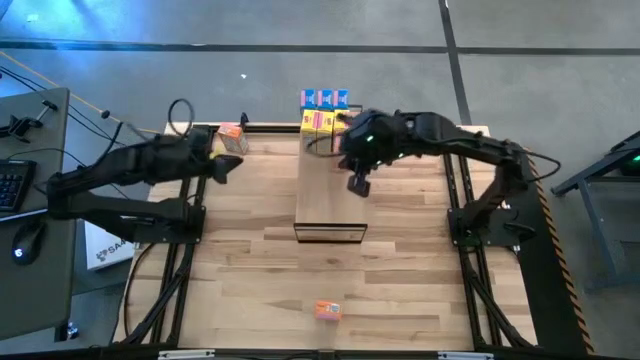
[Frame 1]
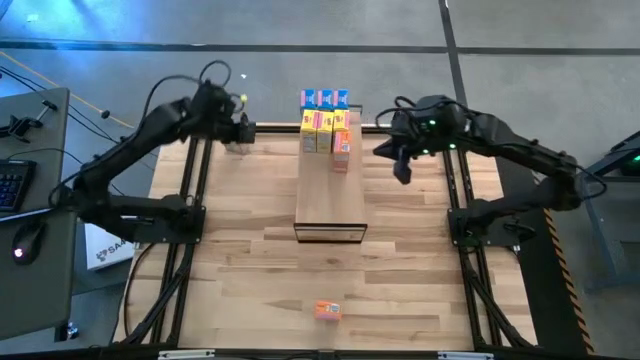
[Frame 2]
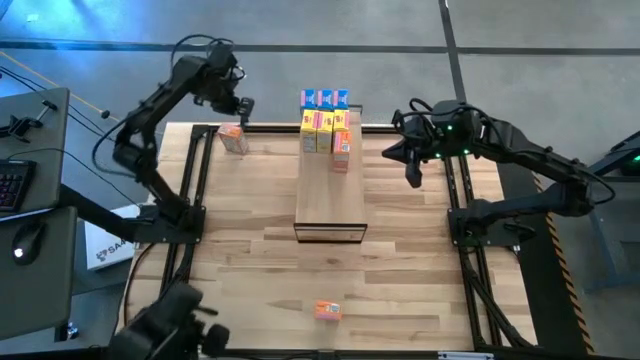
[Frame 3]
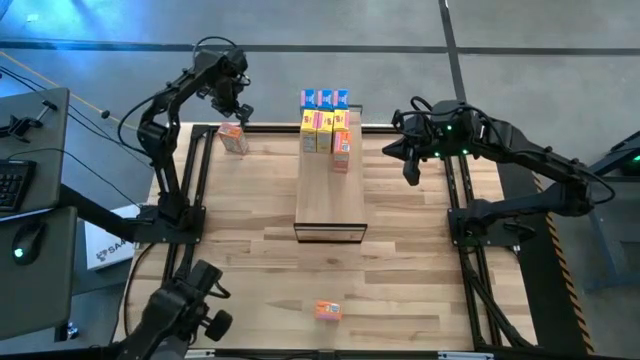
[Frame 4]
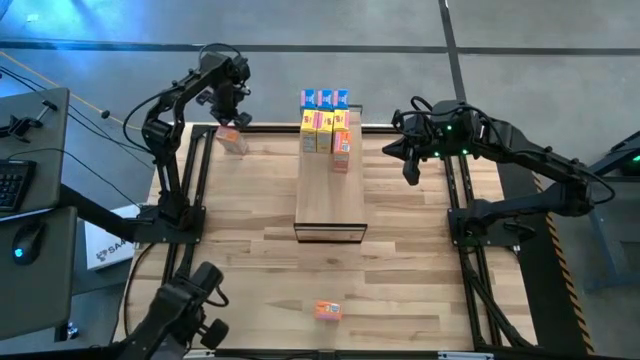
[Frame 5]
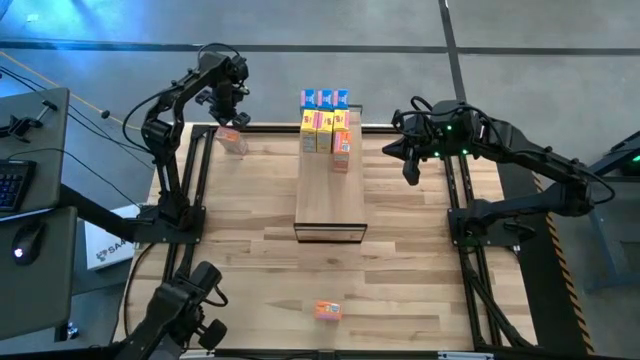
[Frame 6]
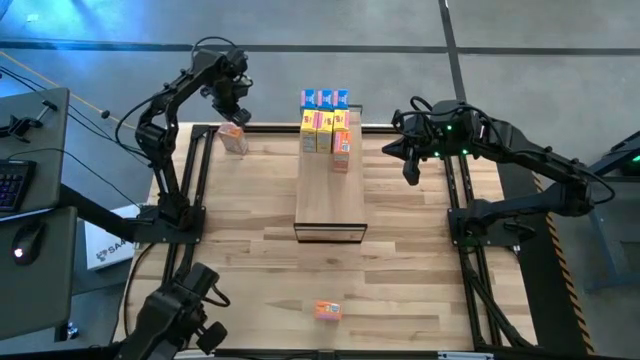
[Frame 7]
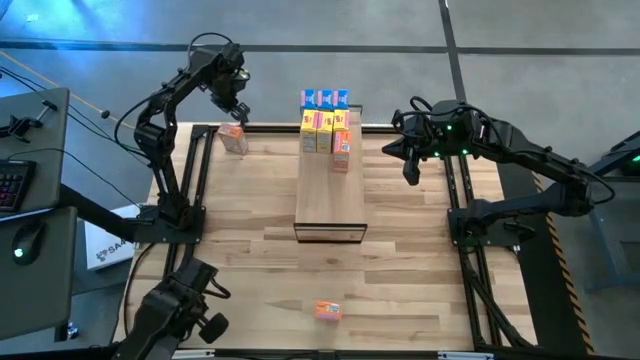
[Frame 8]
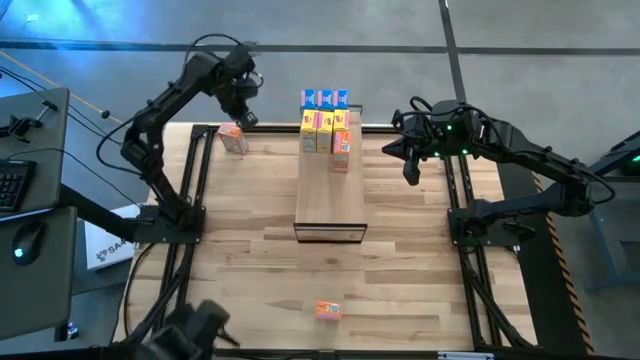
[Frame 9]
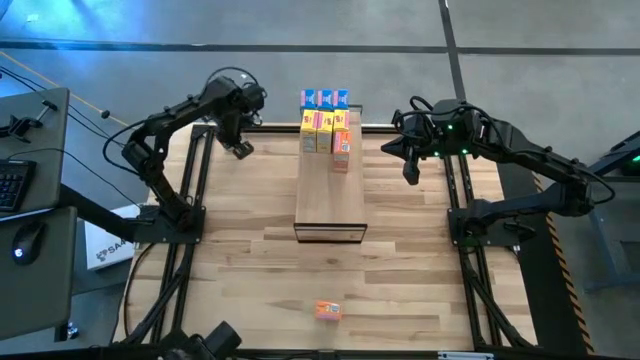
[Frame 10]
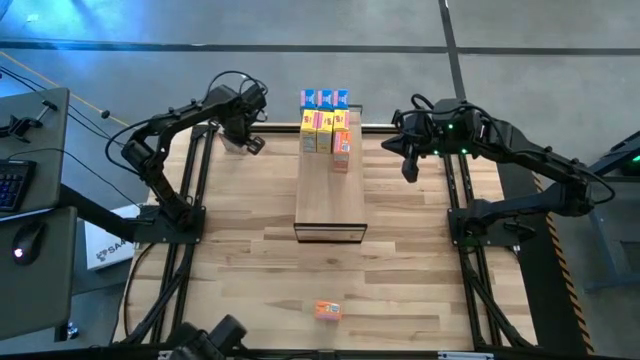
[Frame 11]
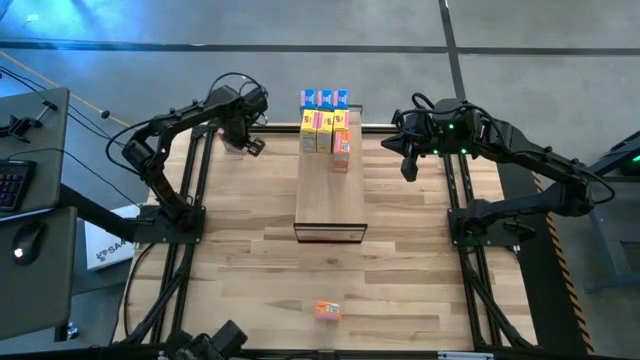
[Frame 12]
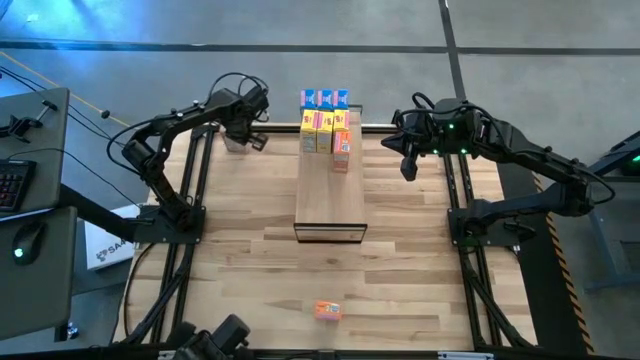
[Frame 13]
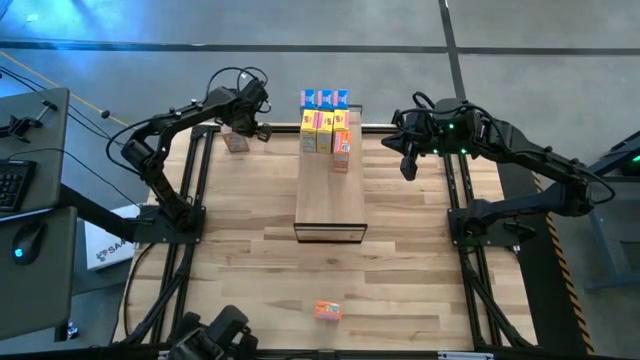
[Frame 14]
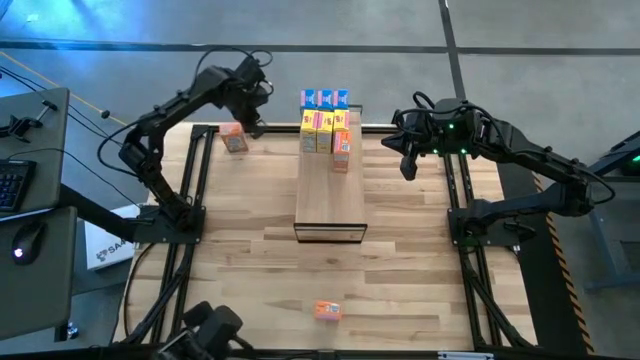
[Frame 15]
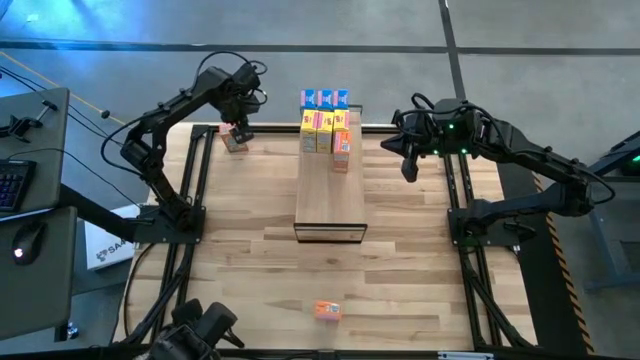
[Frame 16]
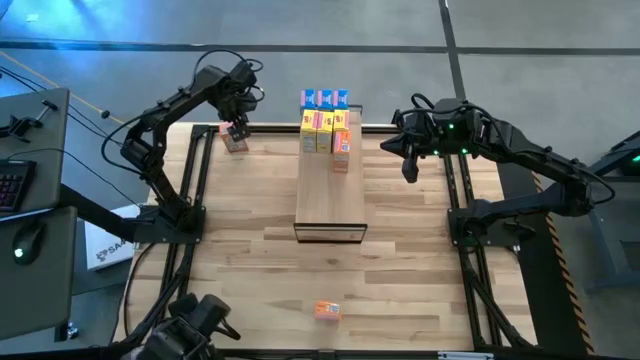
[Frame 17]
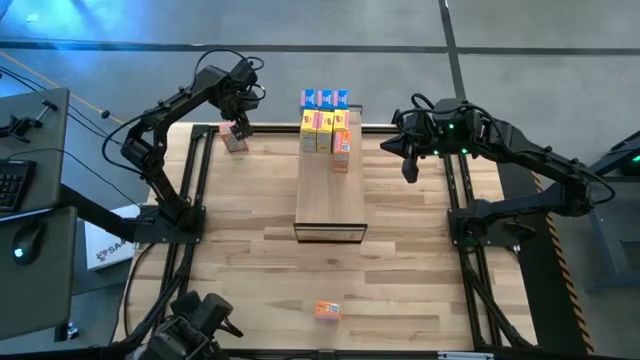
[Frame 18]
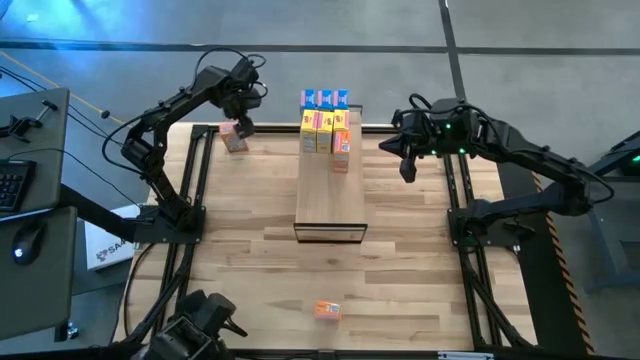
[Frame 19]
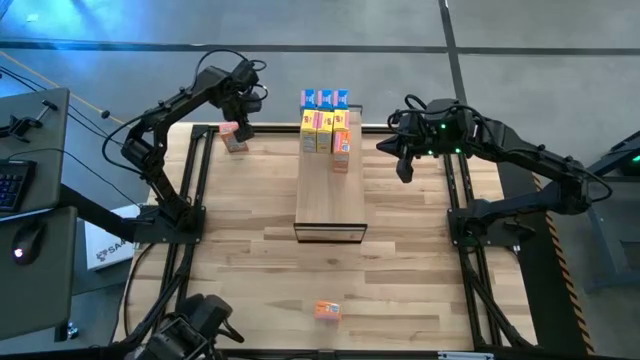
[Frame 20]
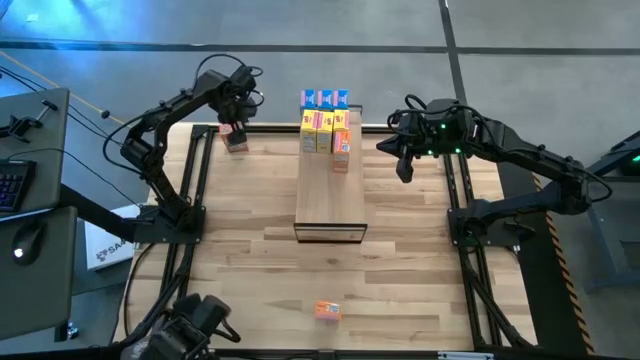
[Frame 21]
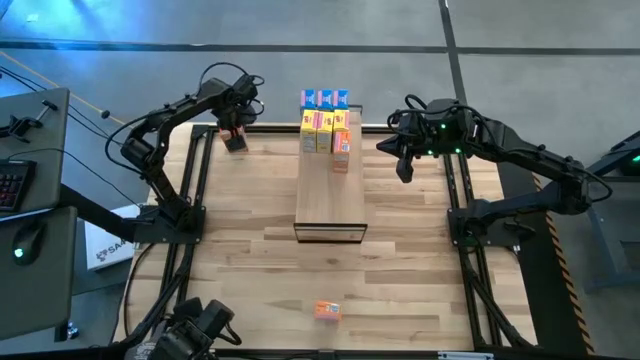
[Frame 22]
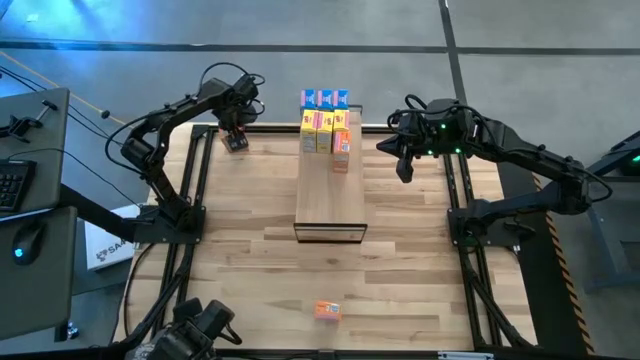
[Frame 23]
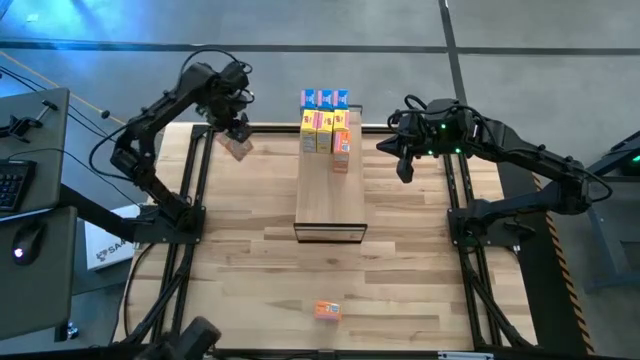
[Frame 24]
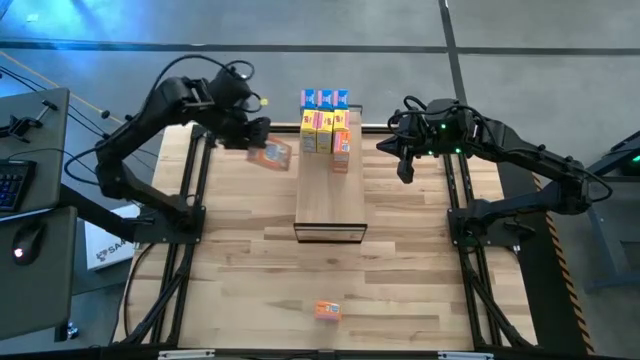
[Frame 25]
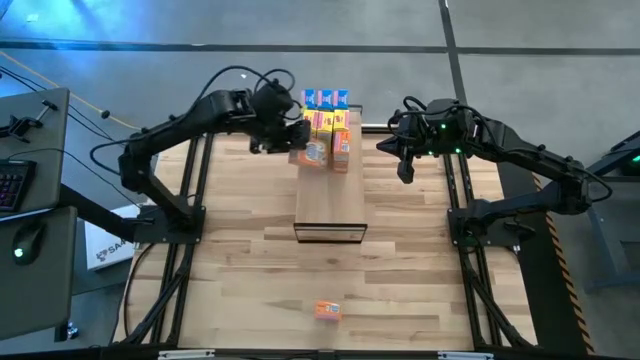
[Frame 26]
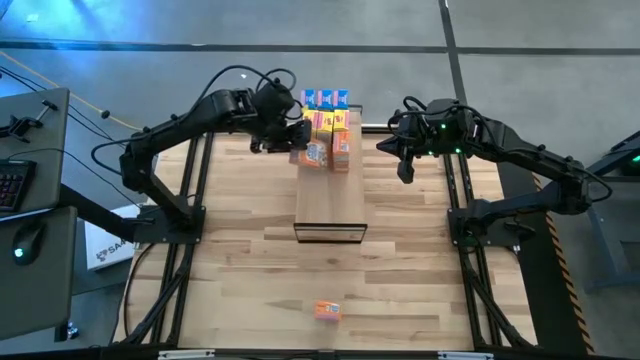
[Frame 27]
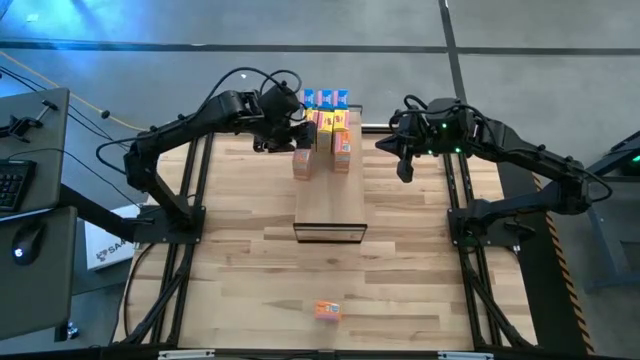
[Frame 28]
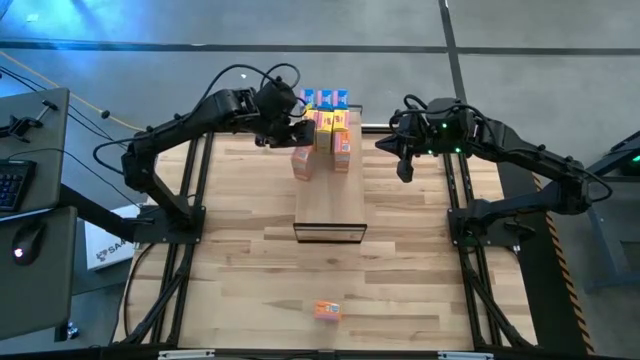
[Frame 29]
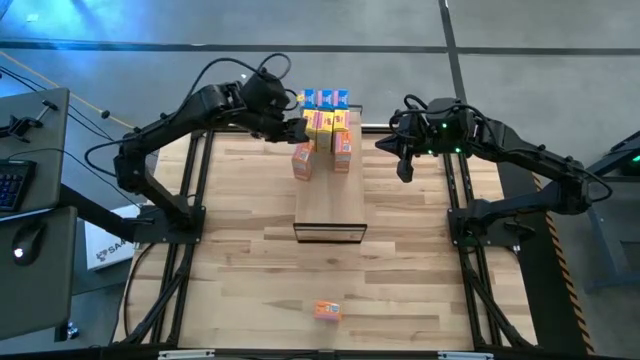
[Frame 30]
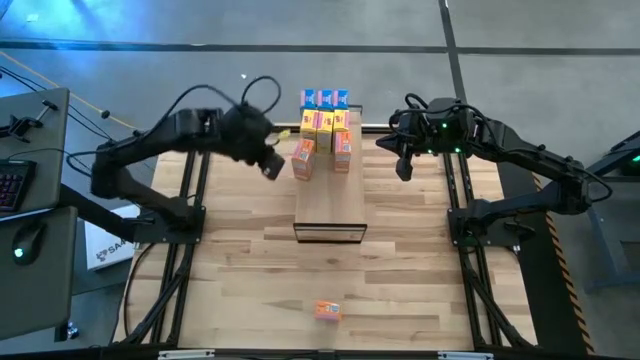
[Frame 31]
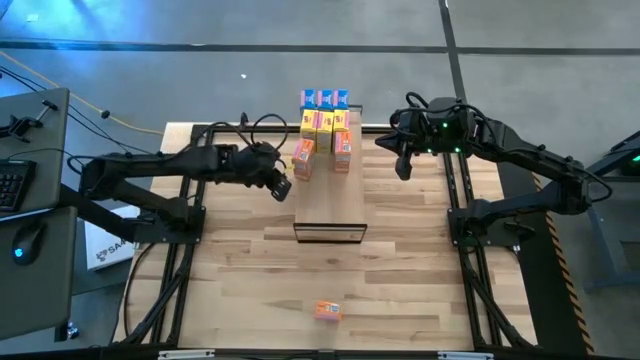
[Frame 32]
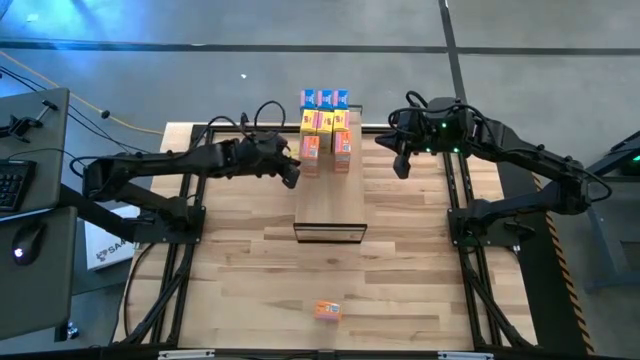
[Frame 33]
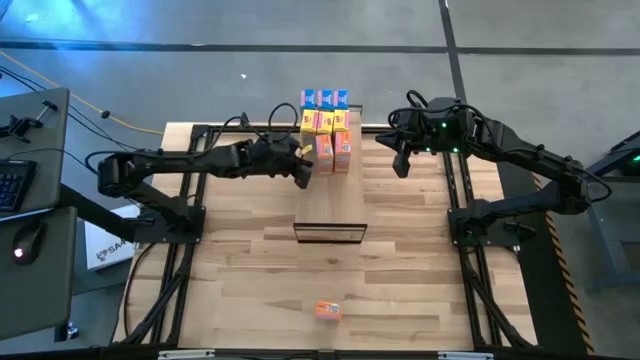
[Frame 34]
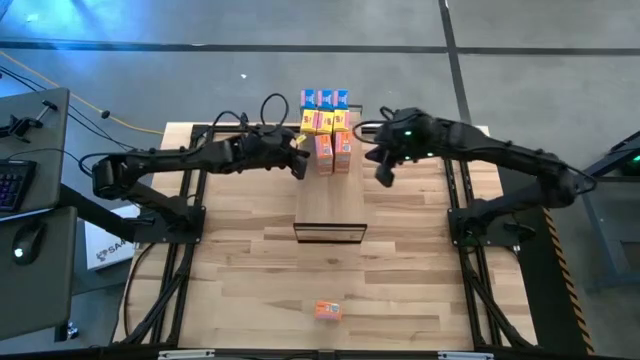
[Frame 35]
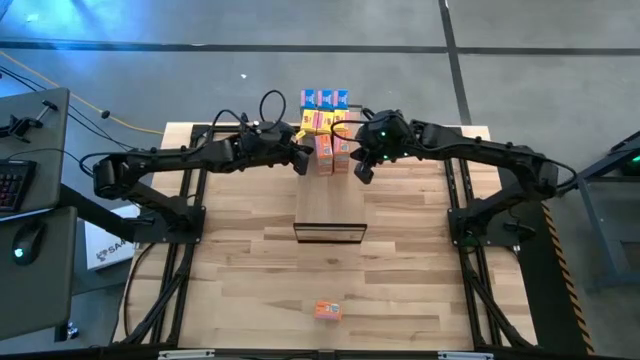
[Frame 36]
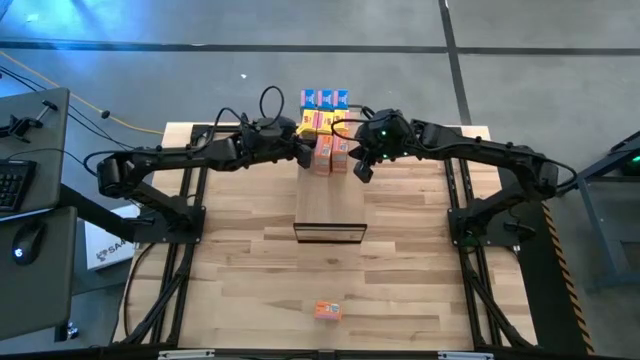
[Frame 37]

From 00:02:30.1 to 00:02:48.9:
Task: Stack cereal on shelf
Put the top orange cereal box on the shelf aligned with the orange cereal box

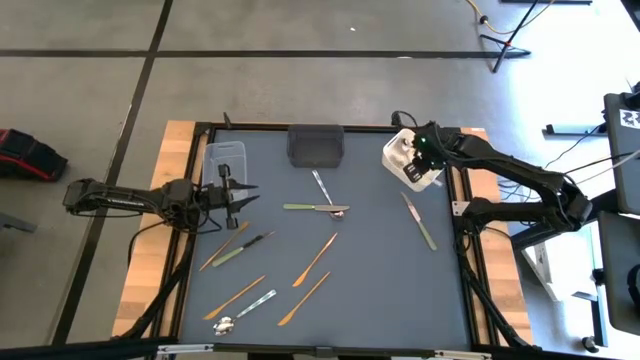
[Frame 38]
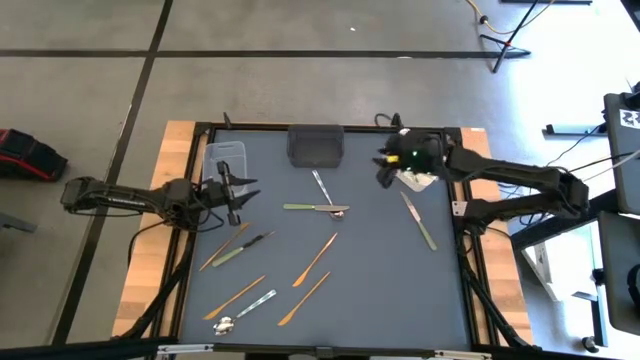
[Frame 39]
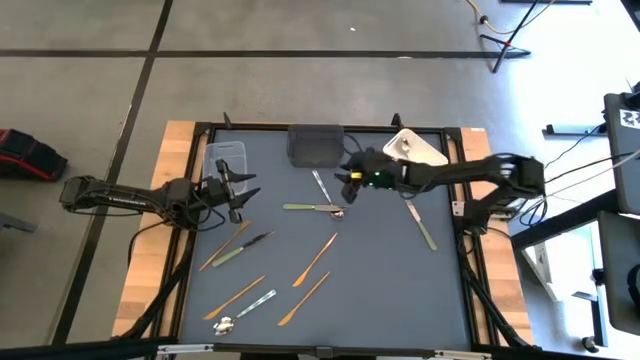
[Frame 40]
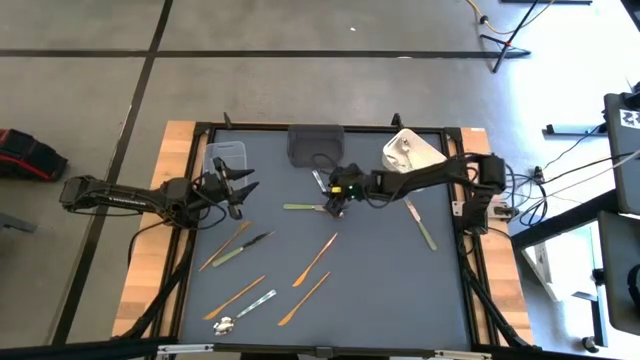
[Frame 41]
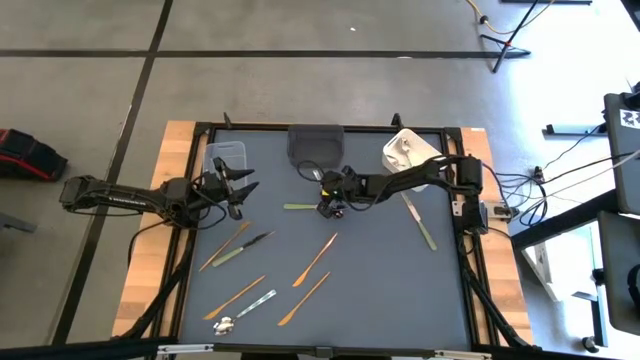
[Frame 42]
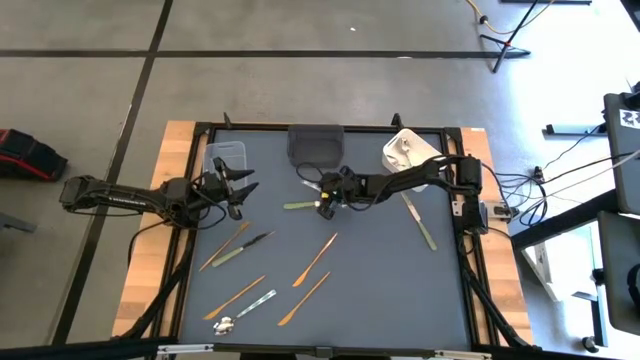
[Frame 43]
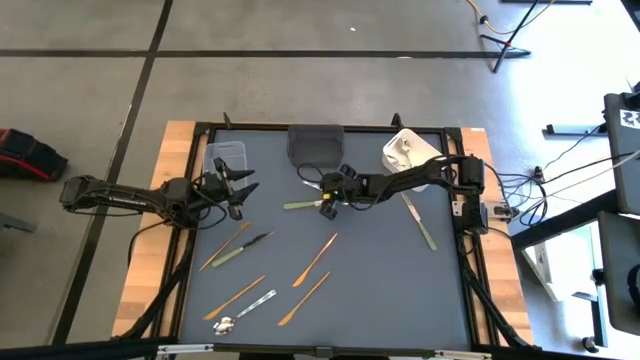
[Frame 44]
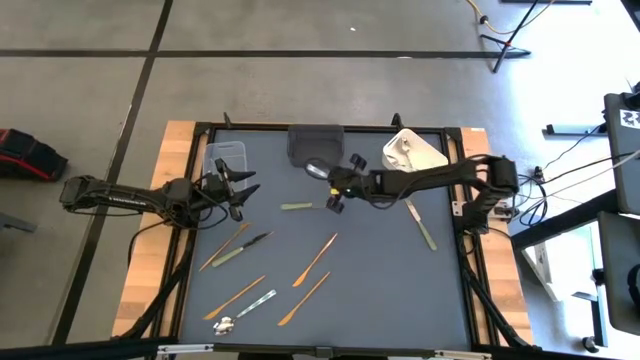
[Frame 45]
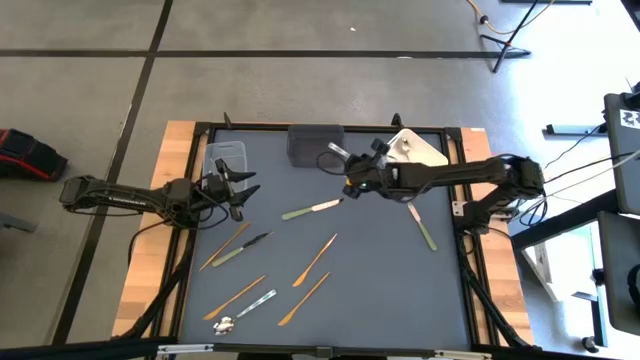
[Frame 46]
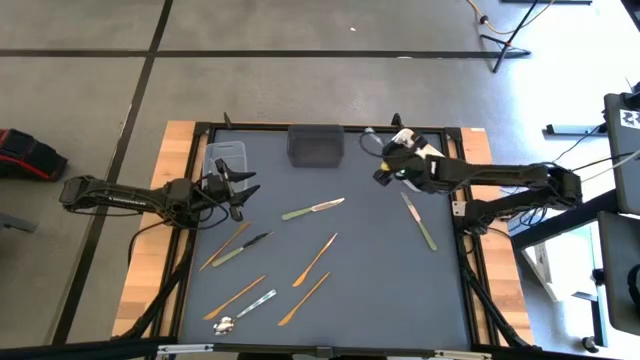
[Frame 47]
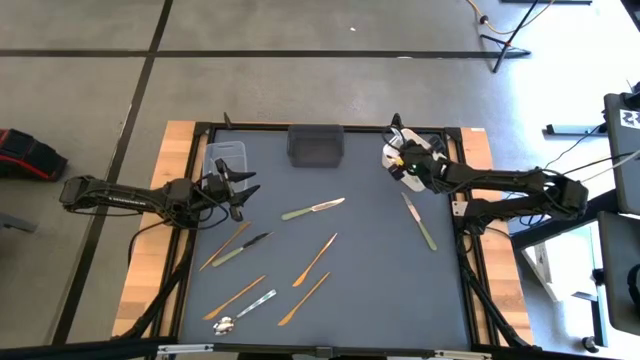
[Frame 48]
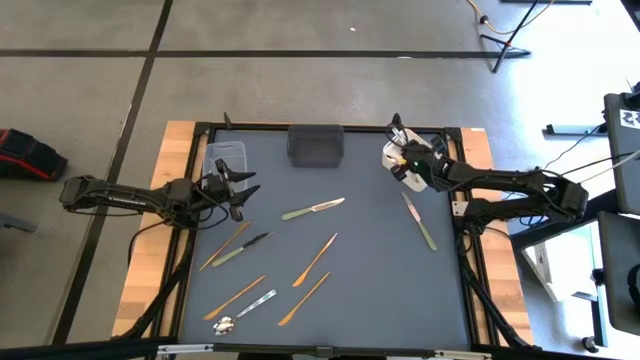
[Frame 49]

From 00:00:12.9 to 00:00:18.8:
Task: Sort silverware by color (type)
Put the top blue spoon into the white bin
